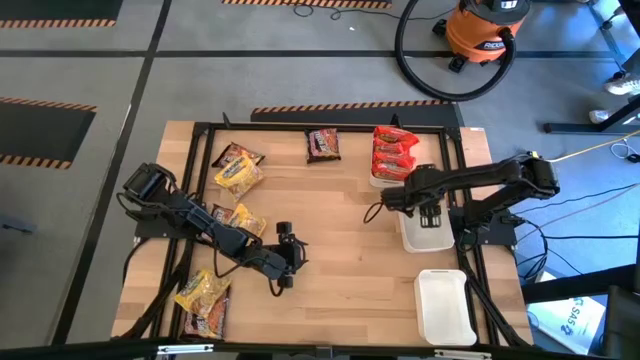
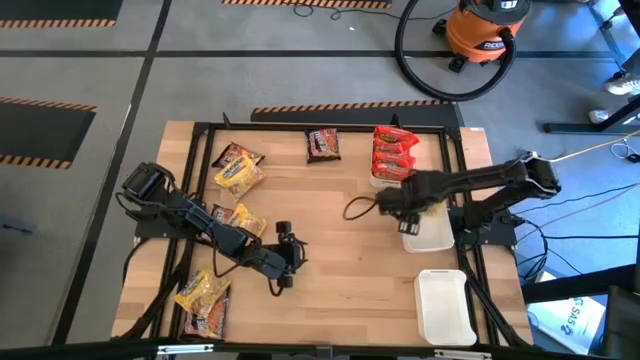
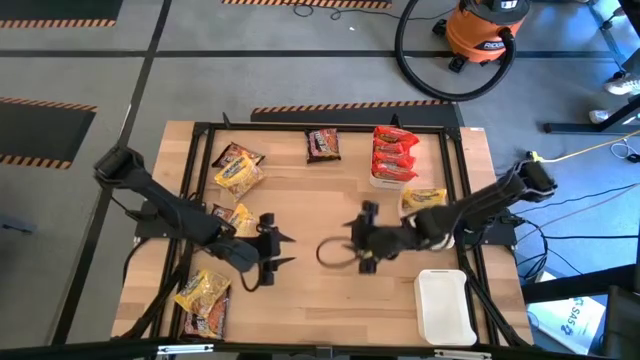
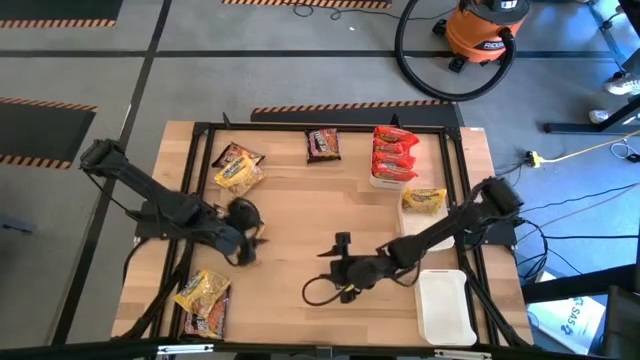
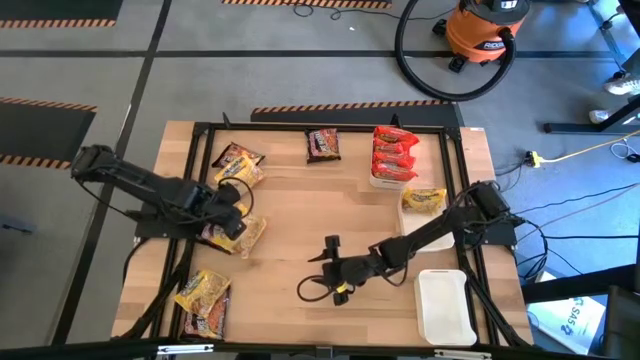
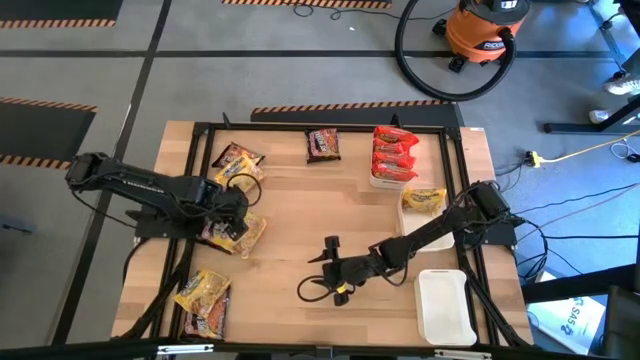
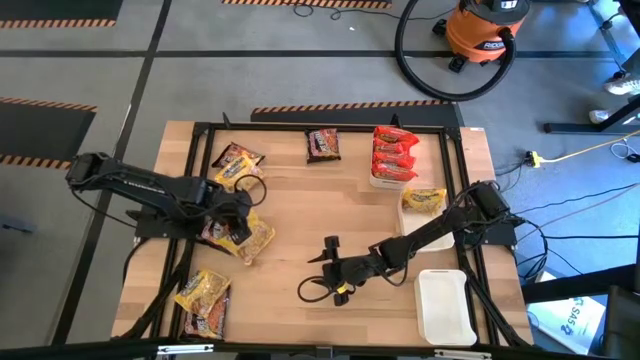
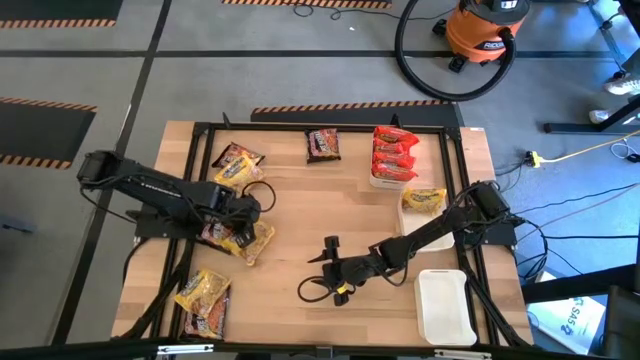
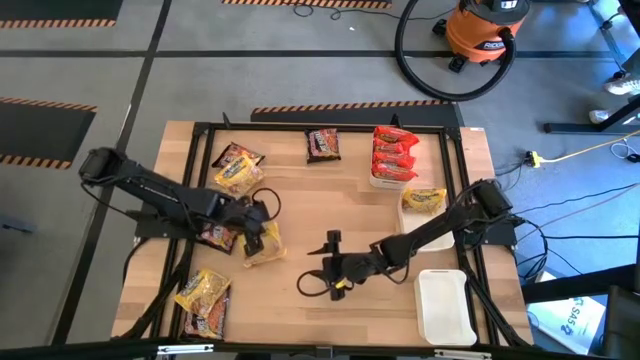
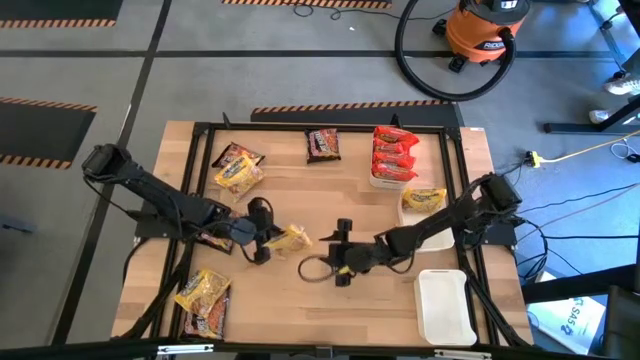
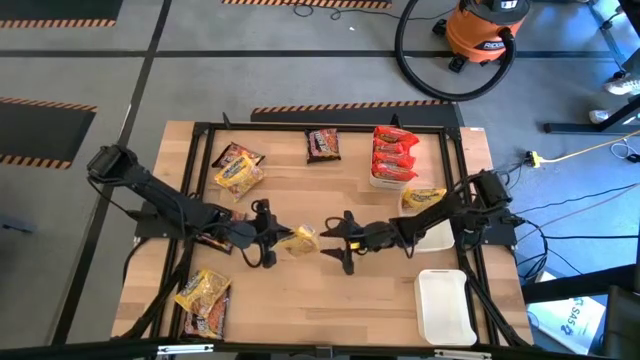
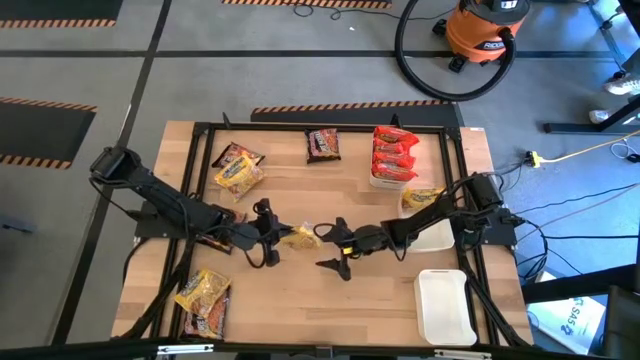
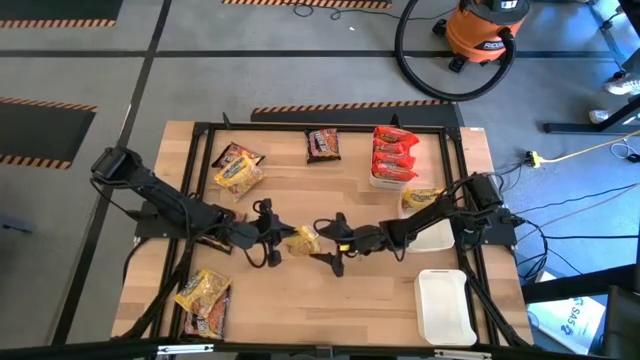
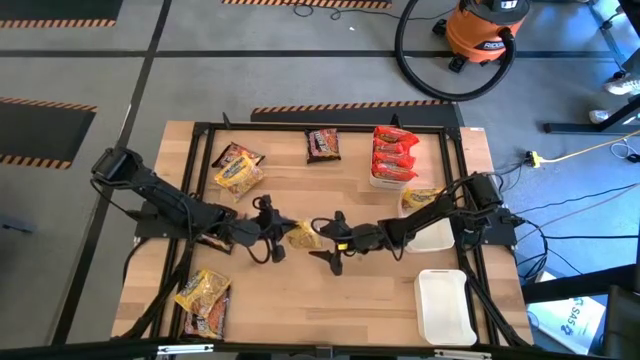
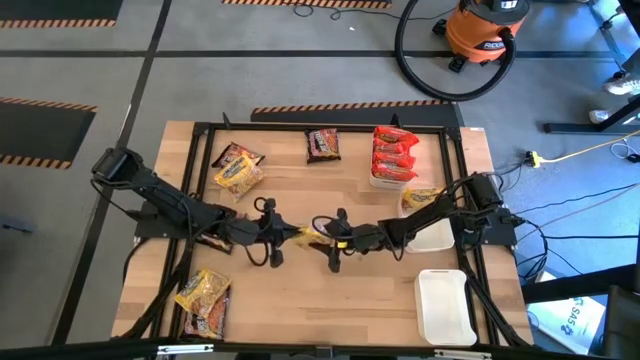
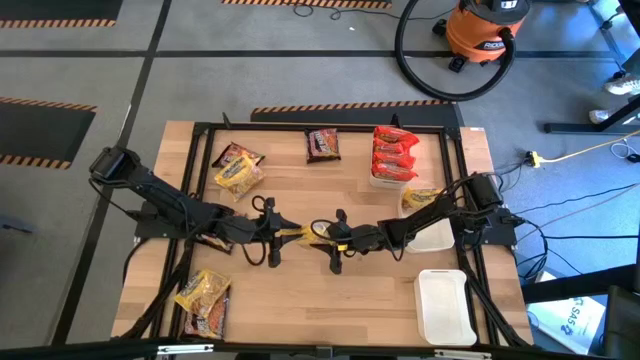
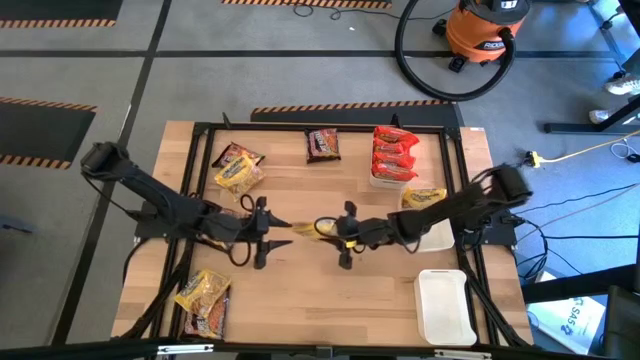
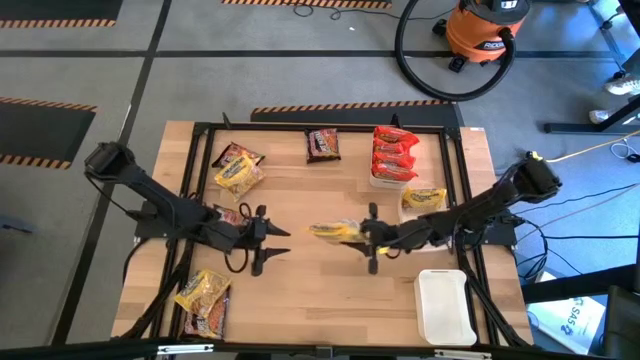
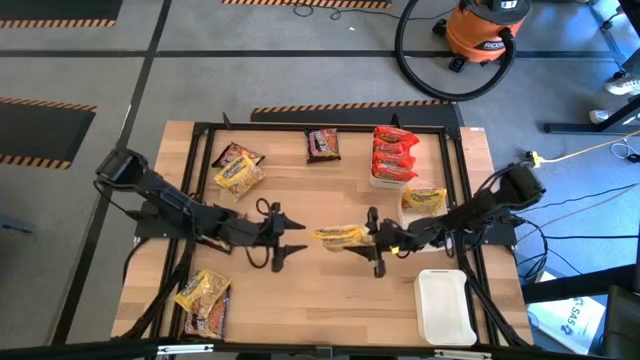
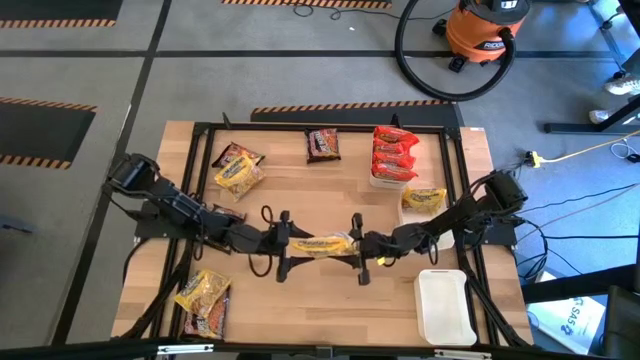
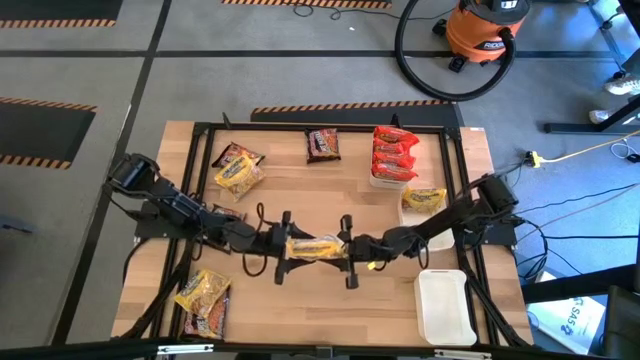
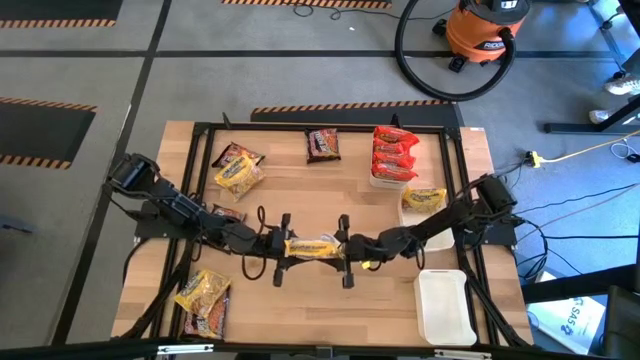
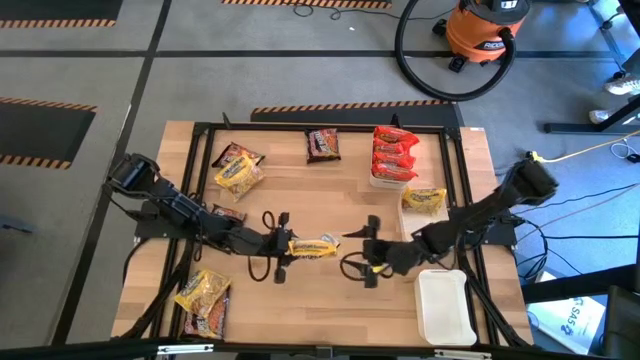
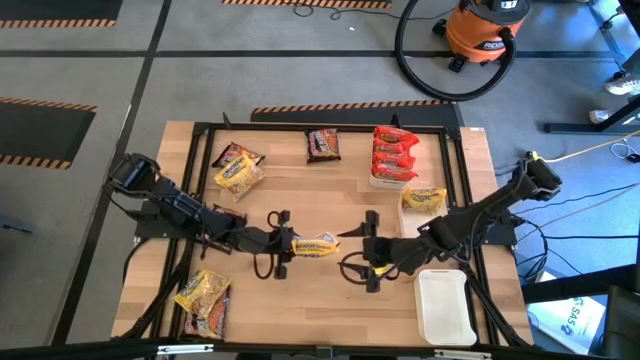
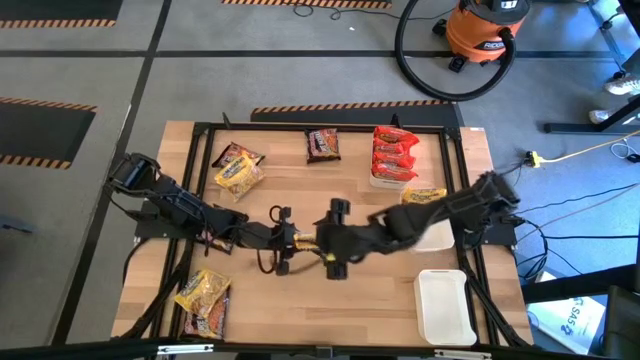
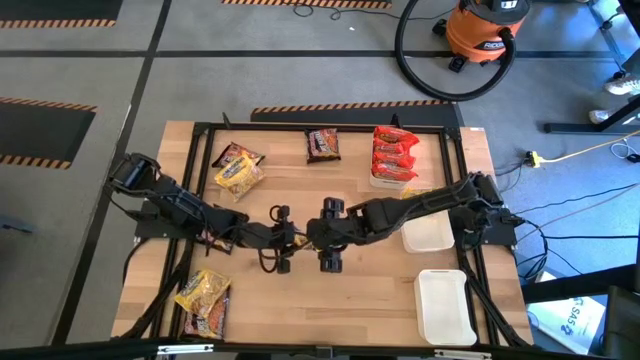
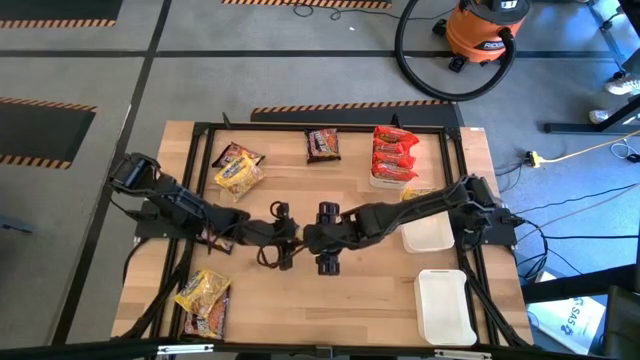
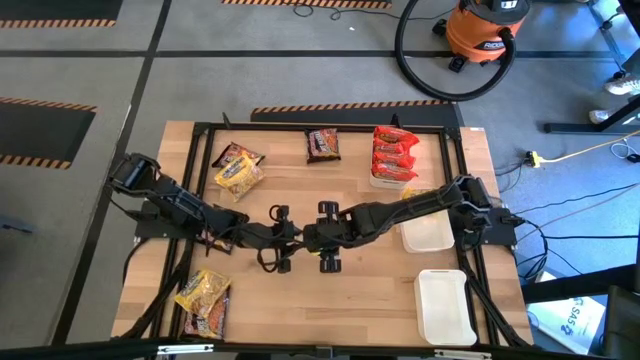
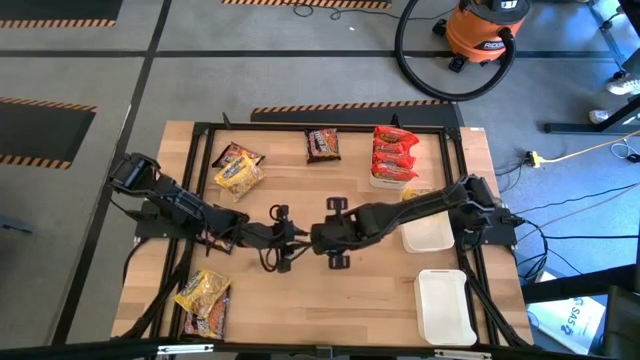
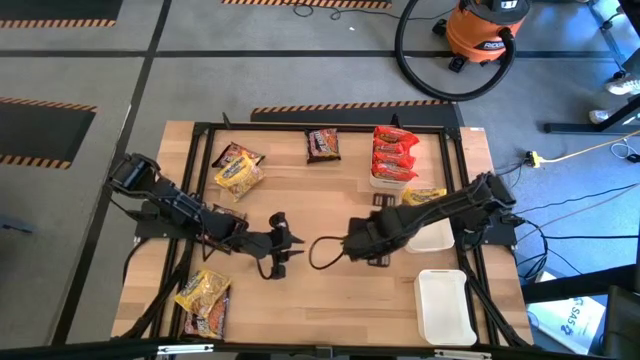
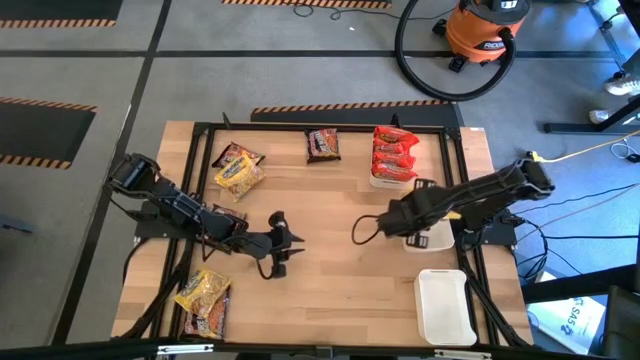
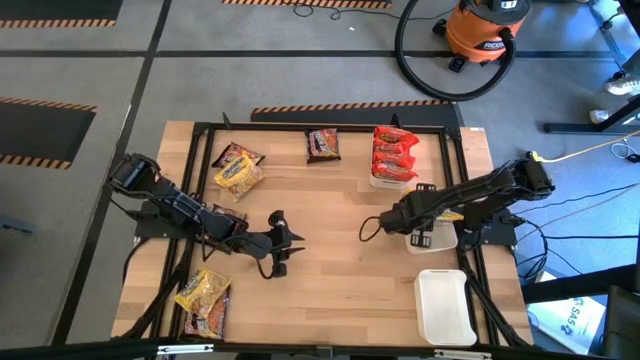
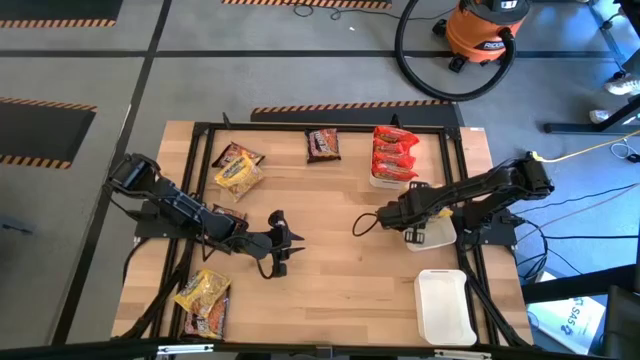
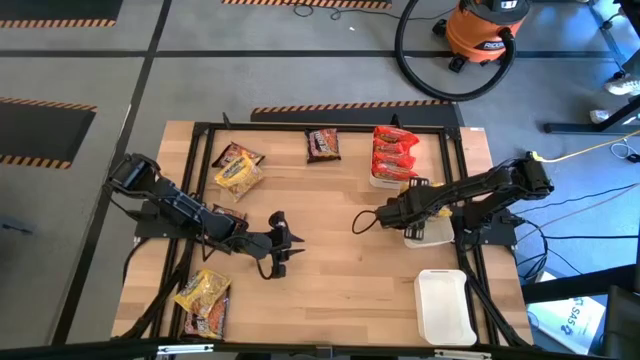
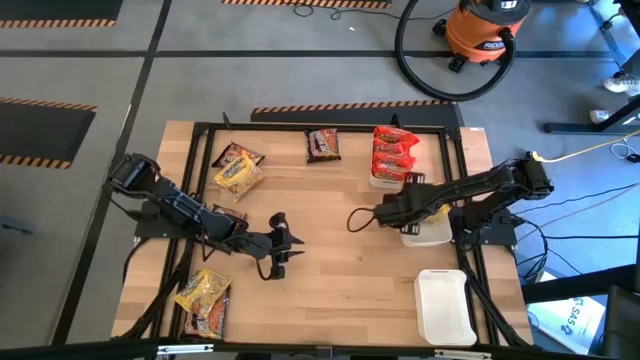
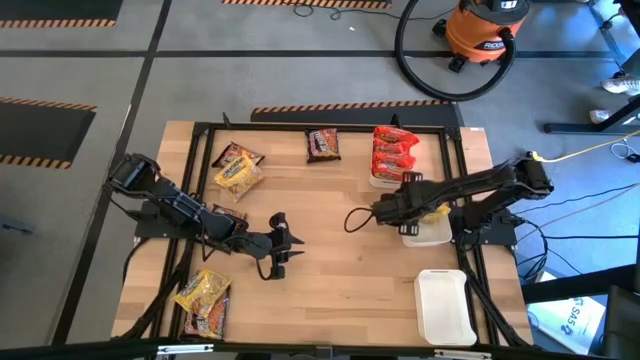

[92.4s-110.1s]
Task: Sort Maruchan noodles
Put the yellow noodle pack into the middle white bin

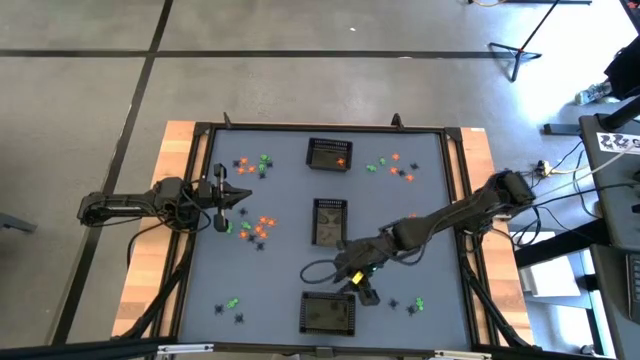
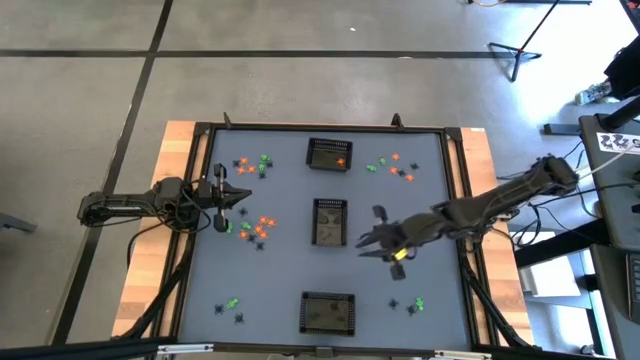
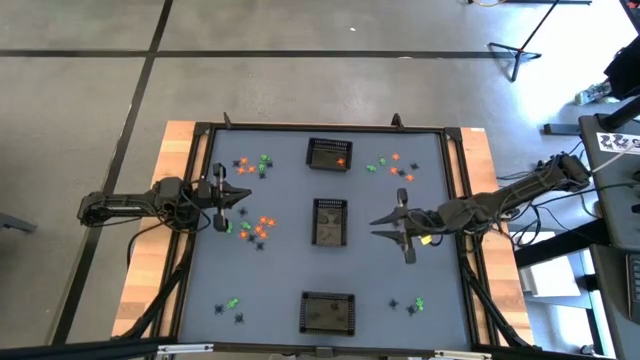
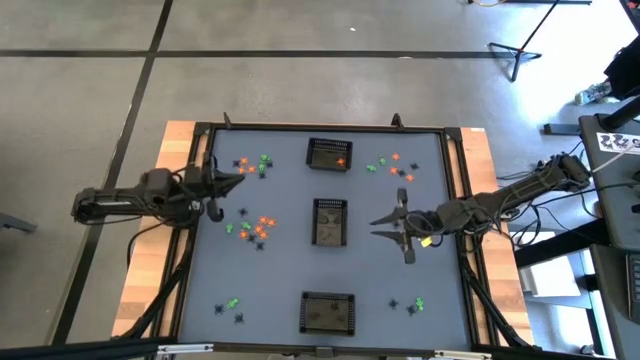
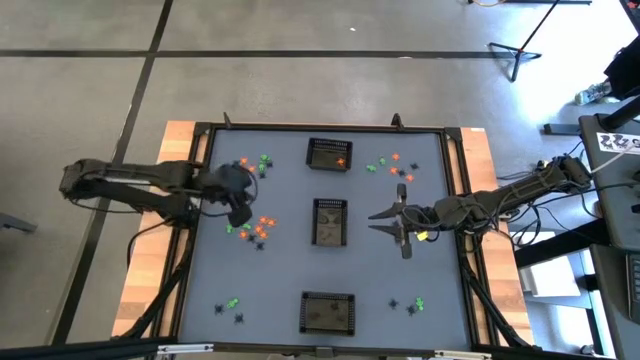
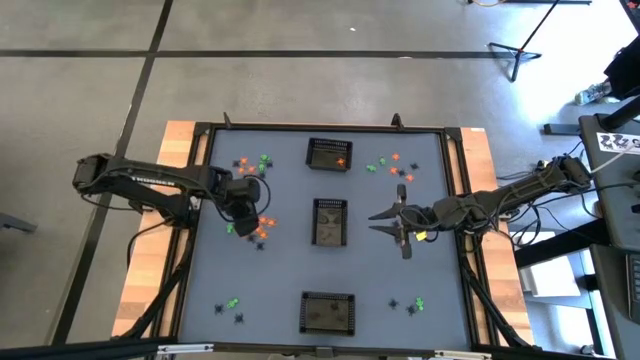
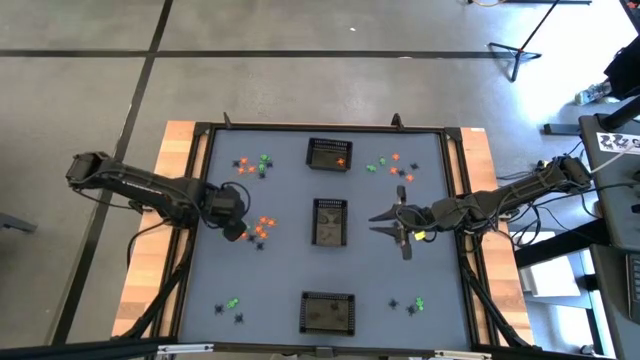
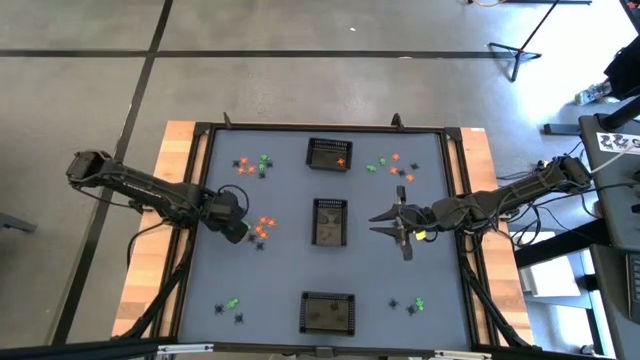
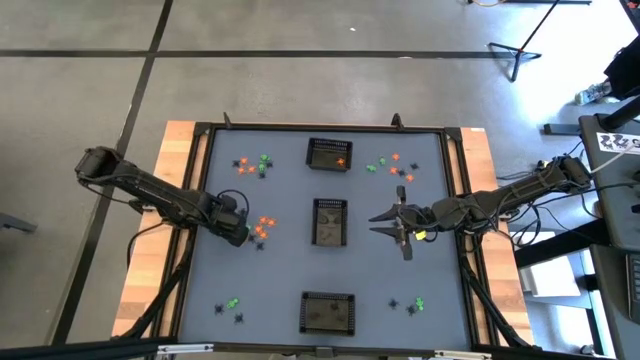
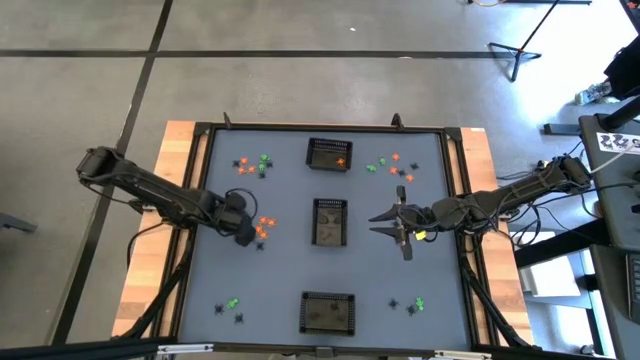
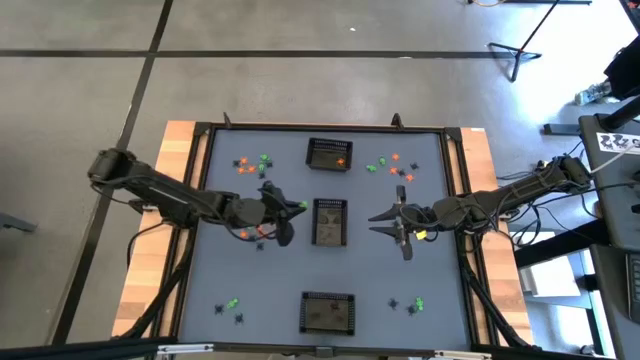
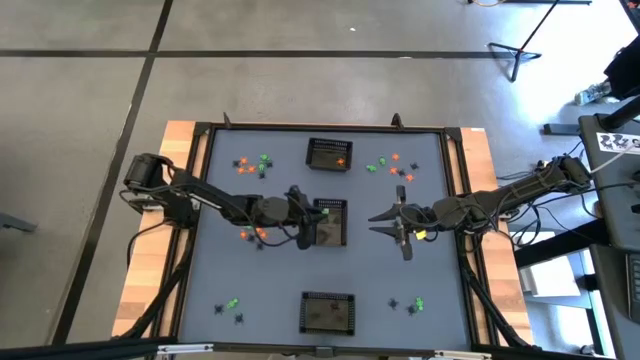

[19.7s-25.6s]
Task: Sort Halloween decoration
Put the green skeleton toy into the center black bin
